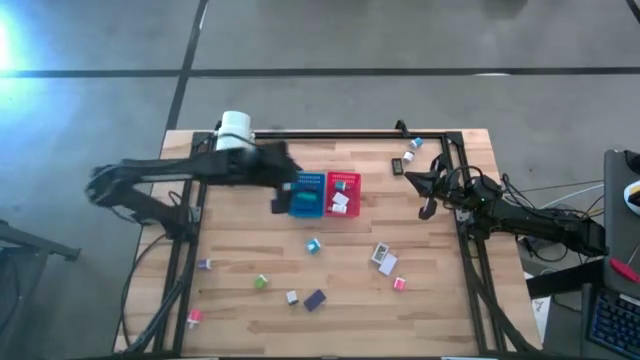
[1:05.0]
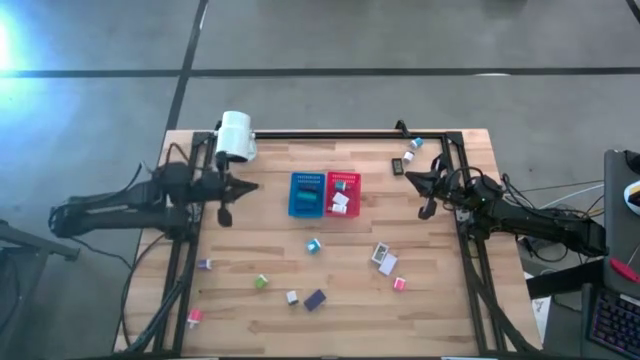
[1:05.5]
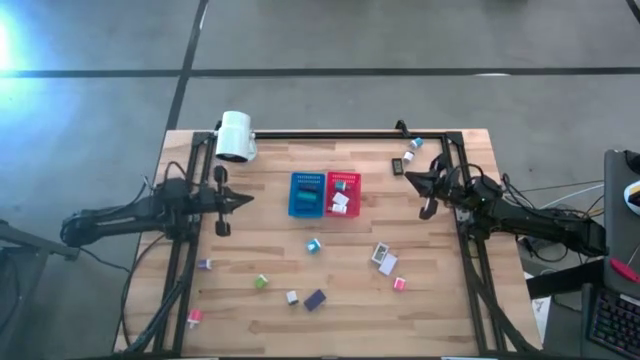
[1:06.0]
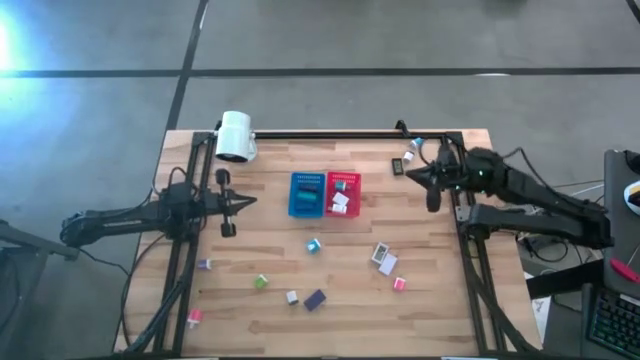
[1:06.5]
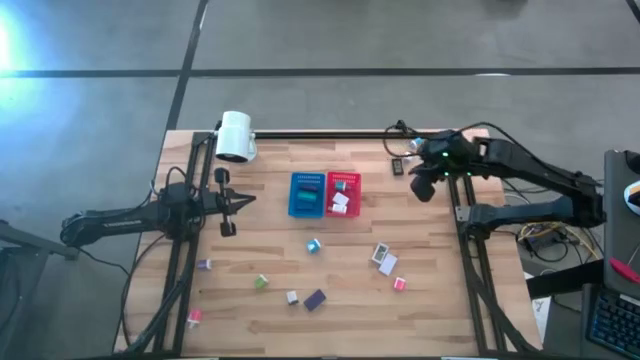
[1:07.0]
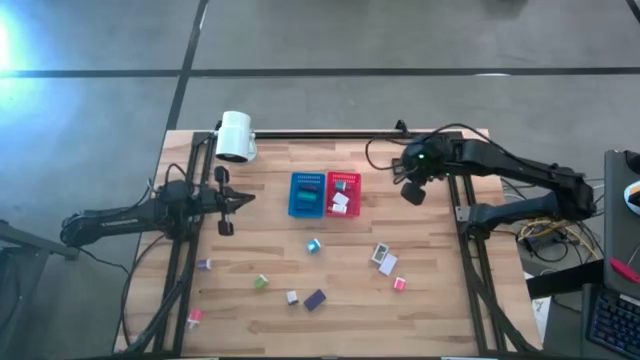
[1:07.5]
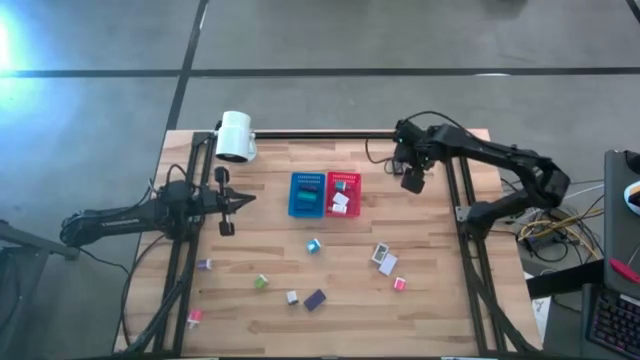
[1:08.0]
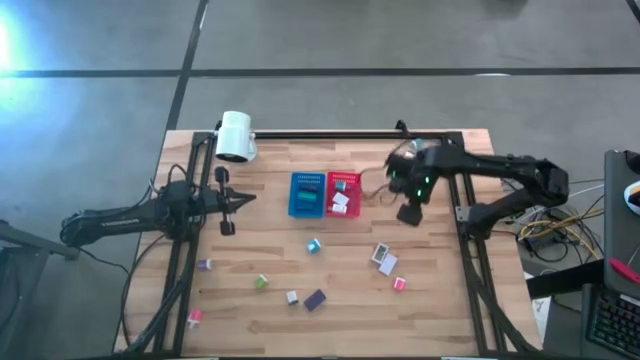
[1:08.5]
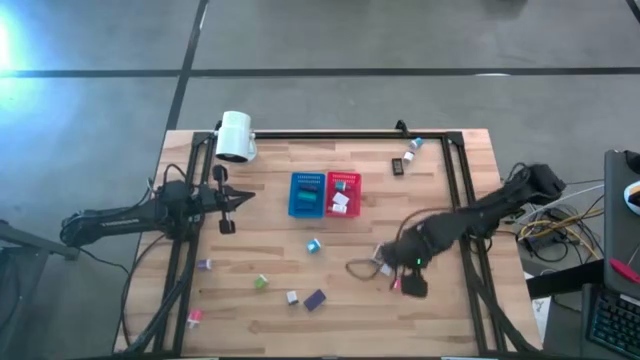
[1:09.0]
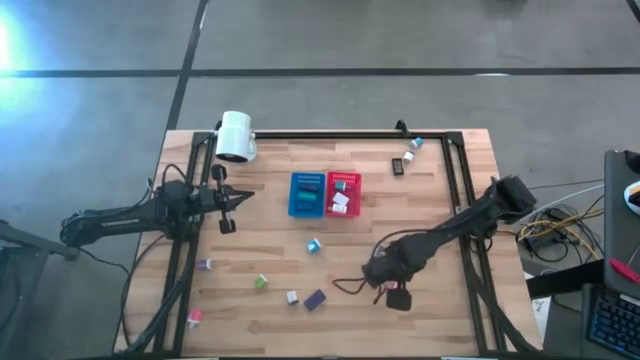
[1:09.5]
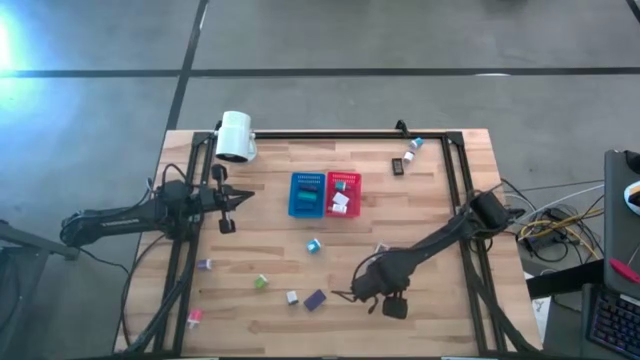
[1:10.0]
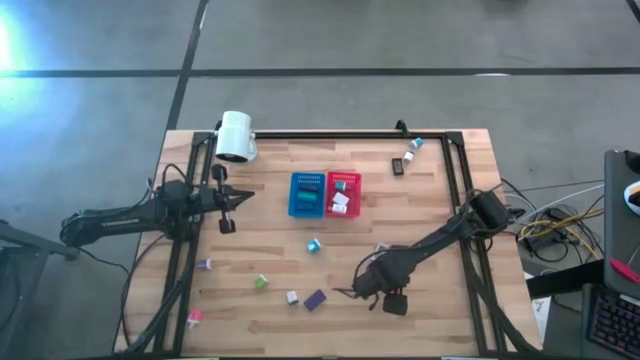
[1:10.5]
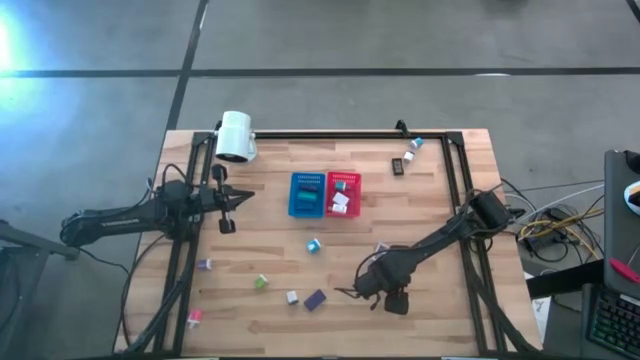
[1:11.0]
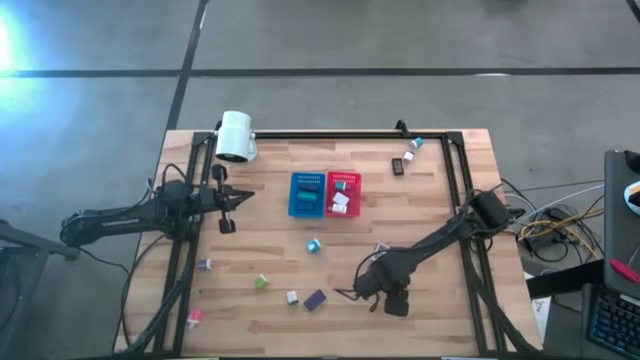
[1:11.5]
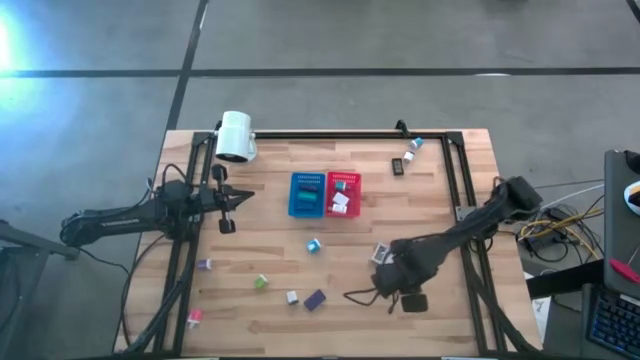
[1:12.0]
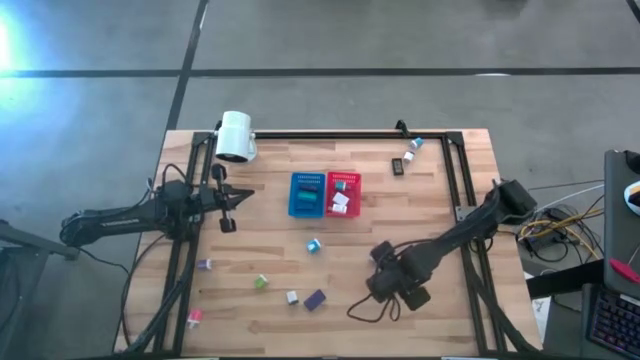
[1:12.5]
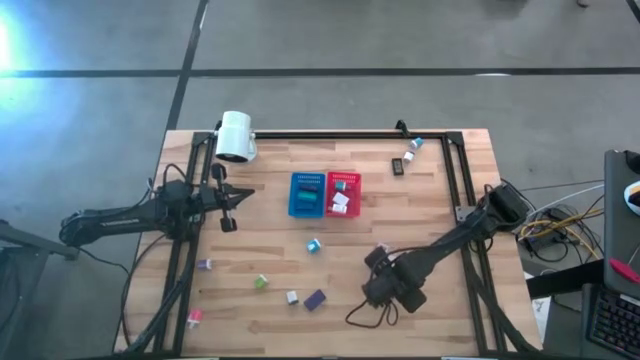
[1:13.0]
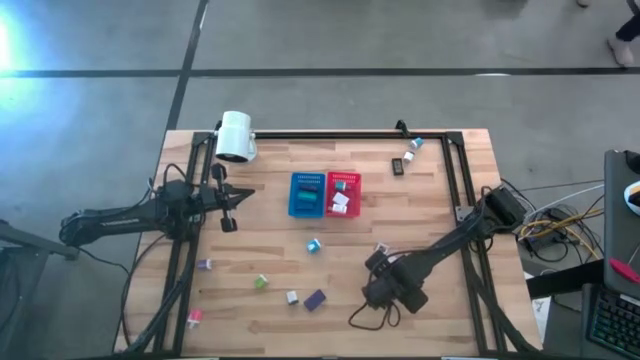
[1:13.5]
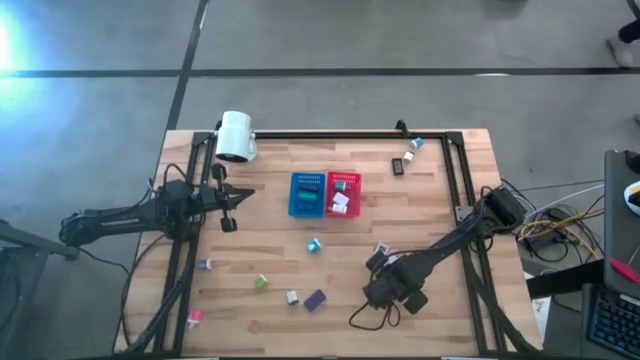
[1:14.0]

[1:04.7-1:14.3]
Task: Pick & Place Office items
Put the right pink charger adapter into the red bin

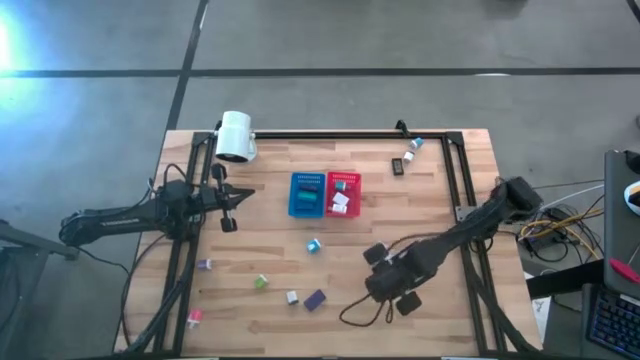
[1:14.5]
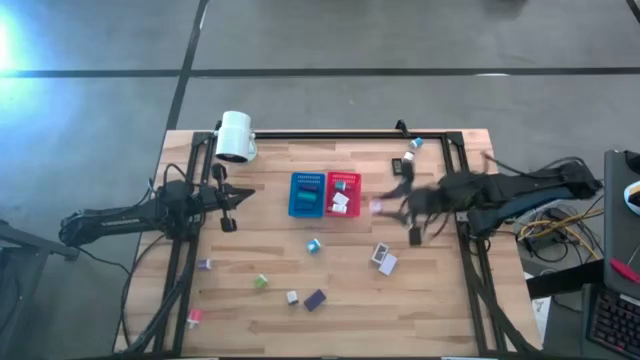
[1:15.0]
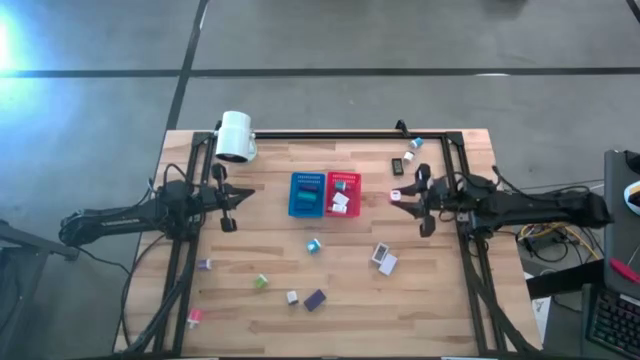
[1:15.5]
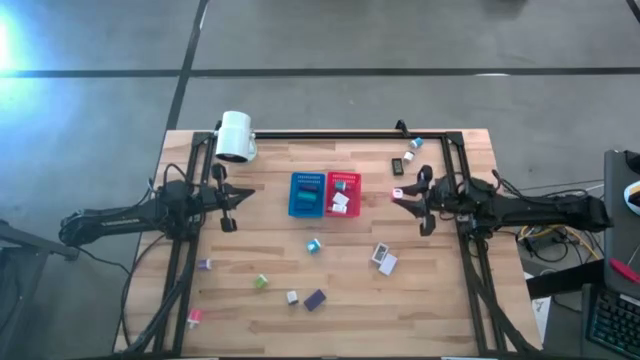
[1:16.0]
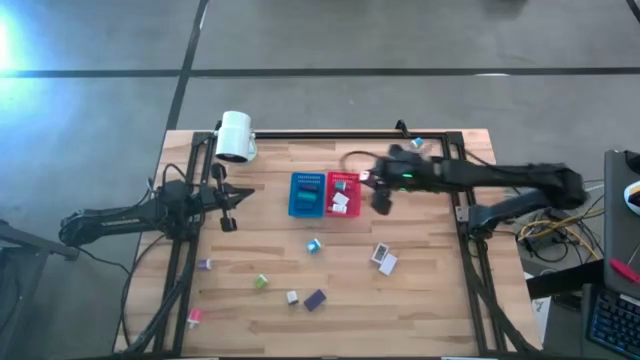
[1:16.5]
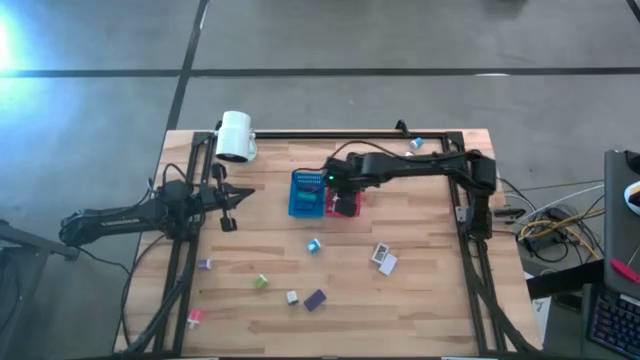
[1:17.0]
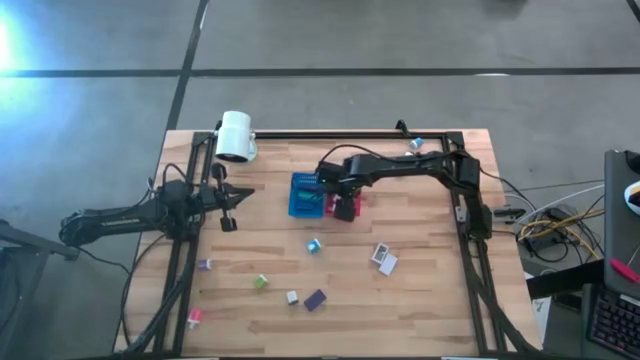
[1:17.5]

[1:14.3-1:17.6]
Put the right pink charger adapter into the red bin

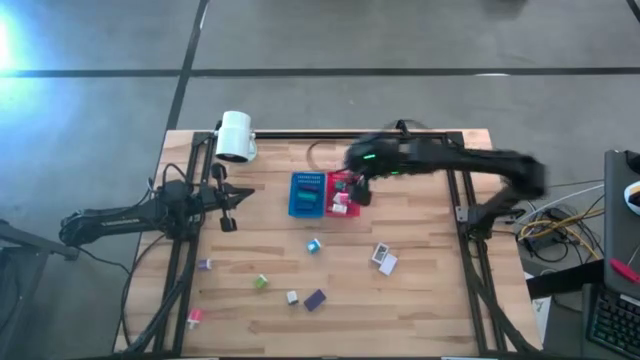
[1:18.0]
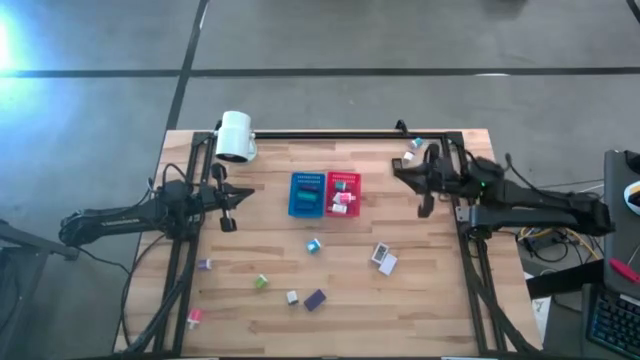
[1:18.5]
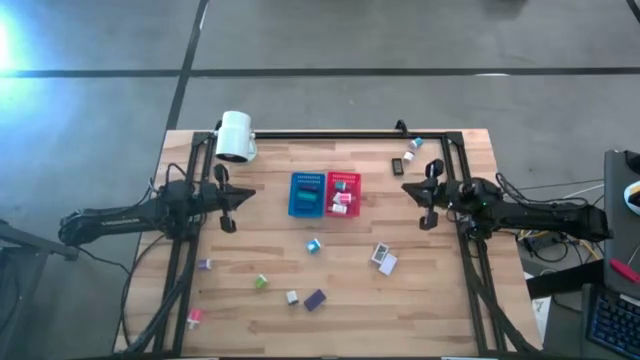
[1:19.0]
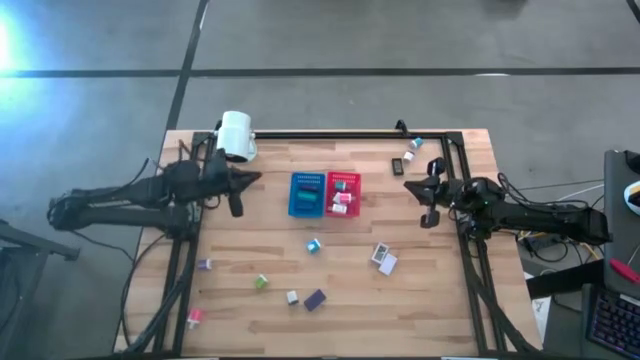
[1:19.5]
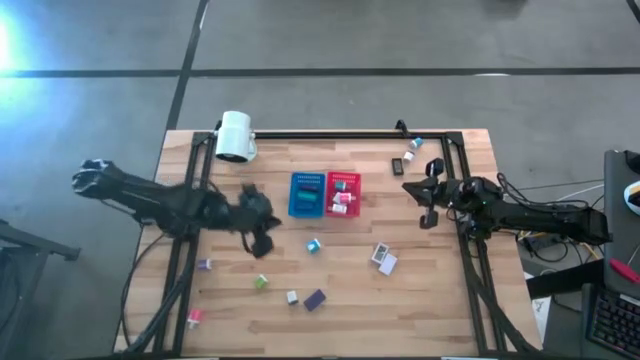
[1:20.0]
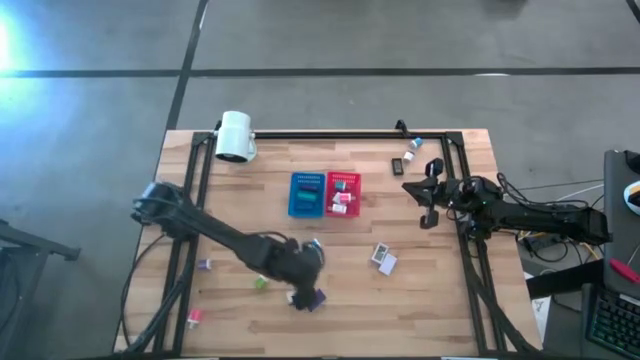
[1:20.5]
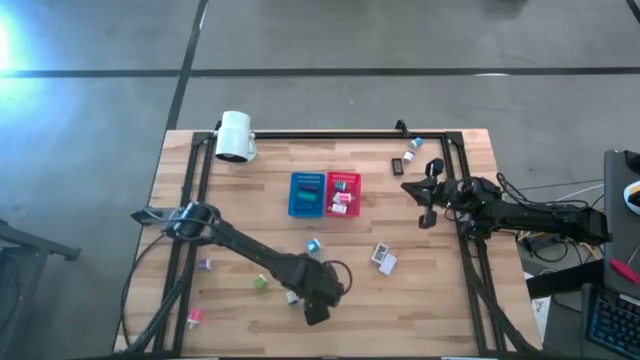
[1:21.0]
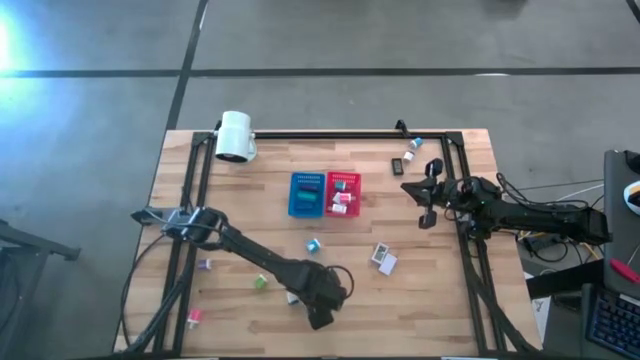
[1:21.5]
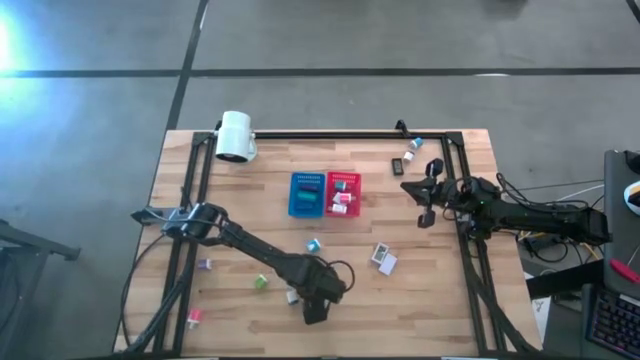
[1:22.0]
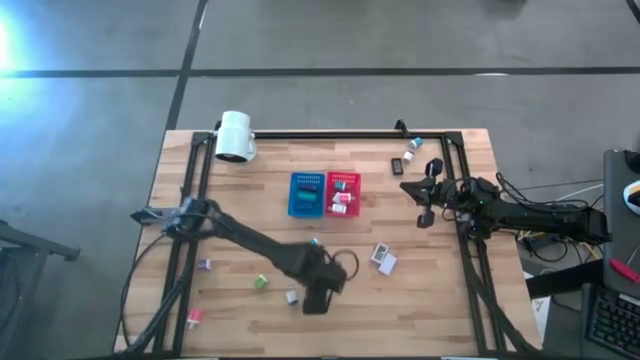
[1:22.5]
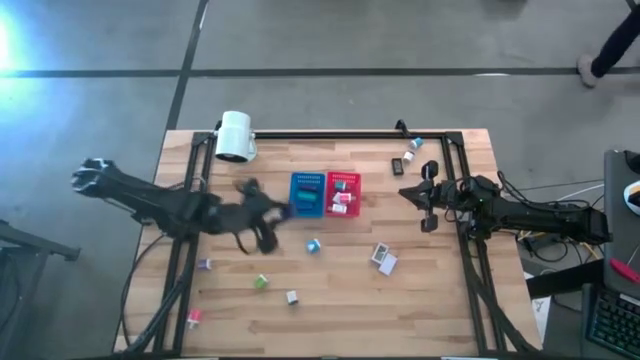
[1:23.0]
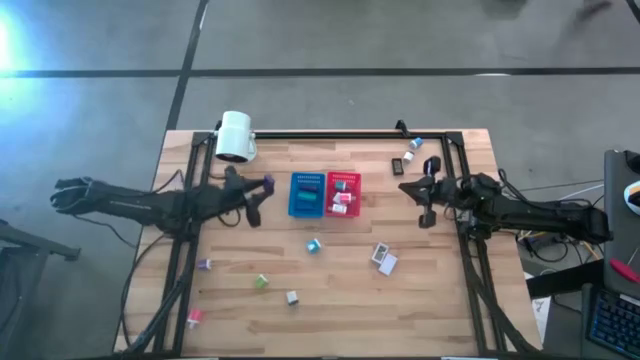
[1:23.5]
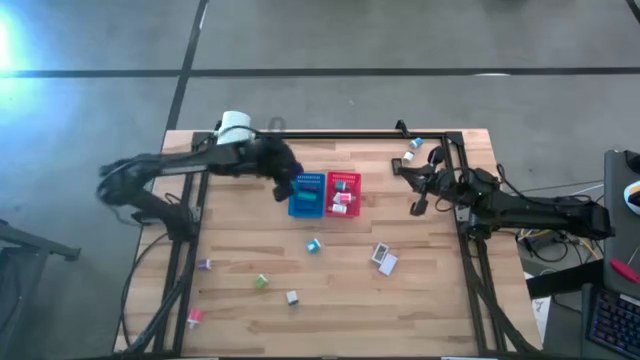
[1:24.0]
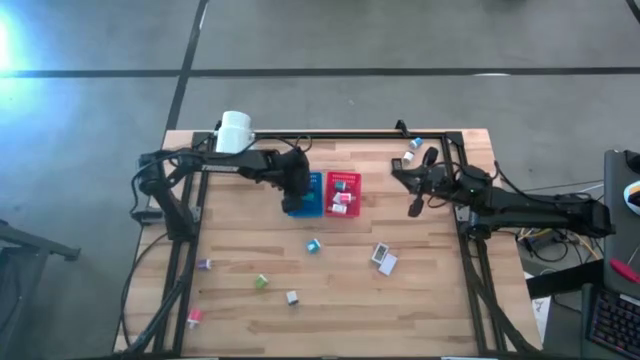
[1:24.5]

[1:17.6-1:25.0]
Put the blue digital clock into the blue bin

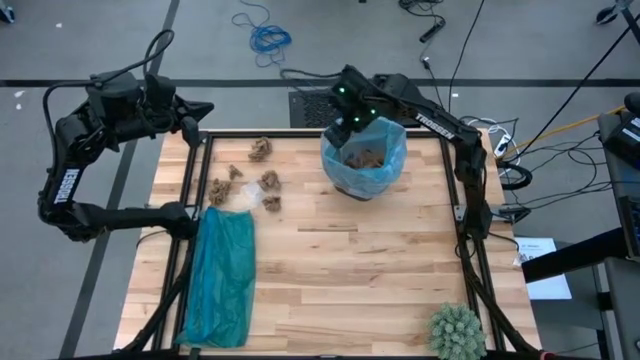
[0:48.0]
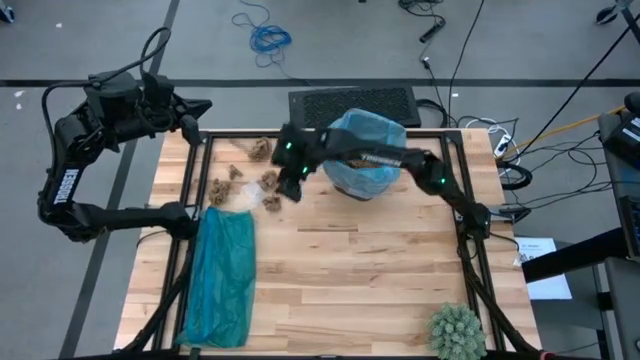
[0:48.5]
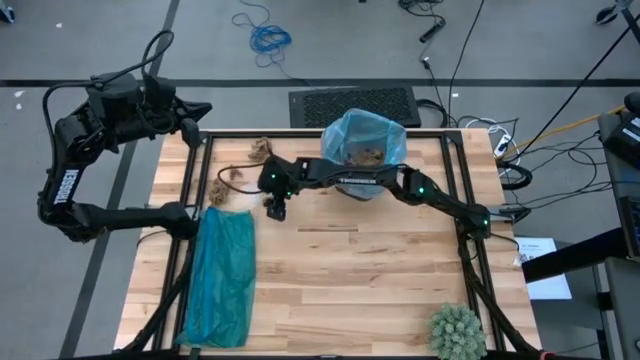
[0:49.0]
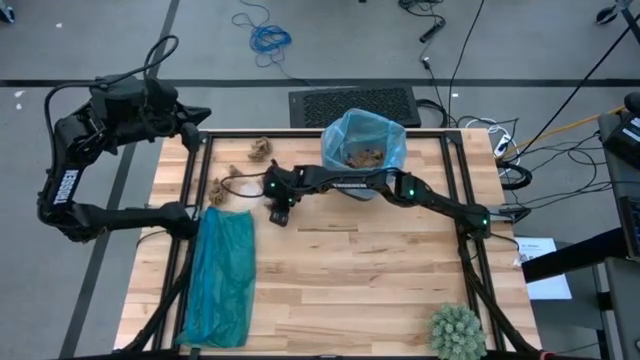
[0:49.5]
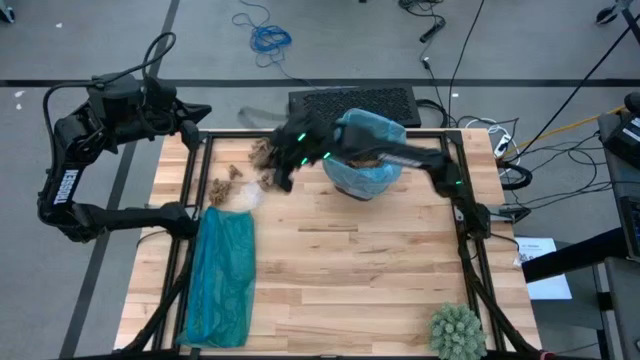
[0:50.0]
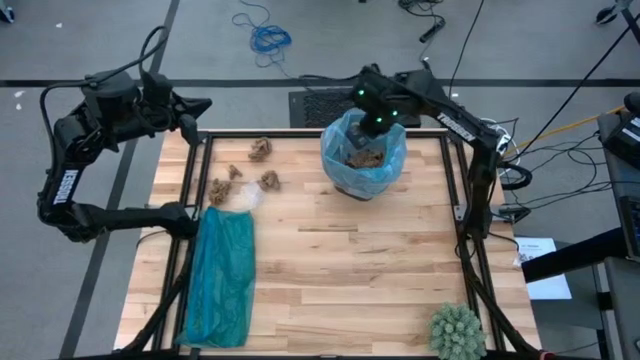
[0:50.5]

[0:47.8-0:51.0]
Task: place trash/remove bag and relplace
Put the brown napkin into the trash bin
